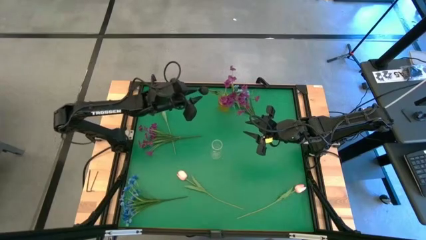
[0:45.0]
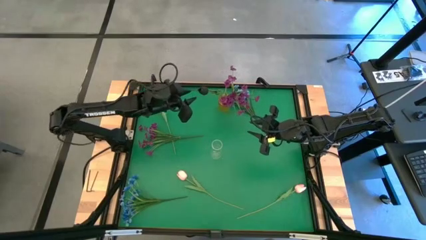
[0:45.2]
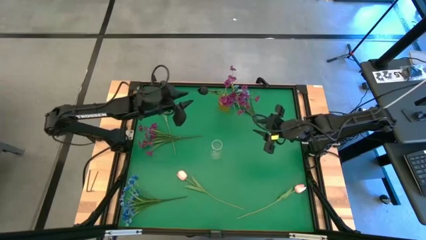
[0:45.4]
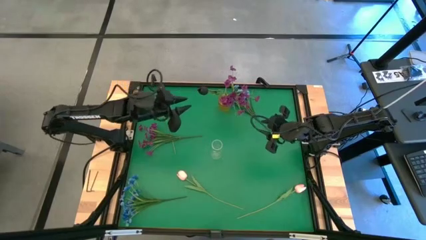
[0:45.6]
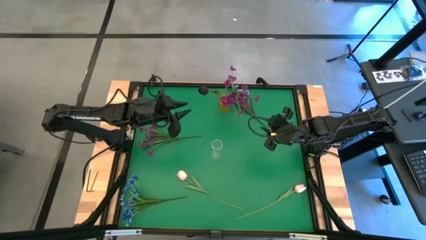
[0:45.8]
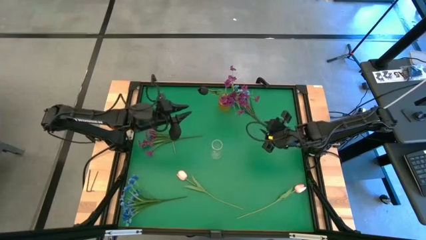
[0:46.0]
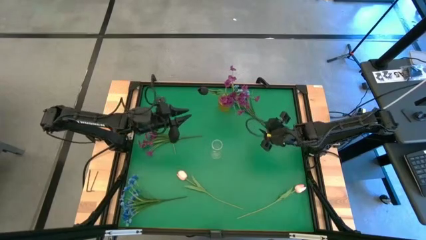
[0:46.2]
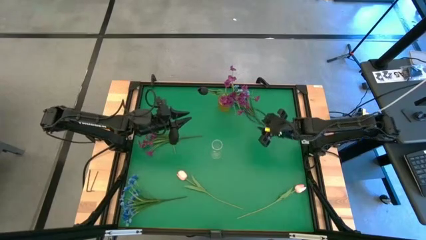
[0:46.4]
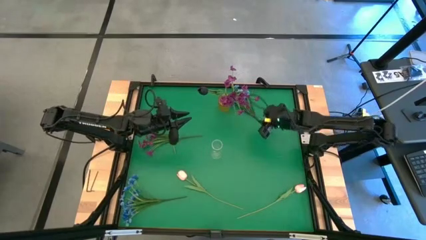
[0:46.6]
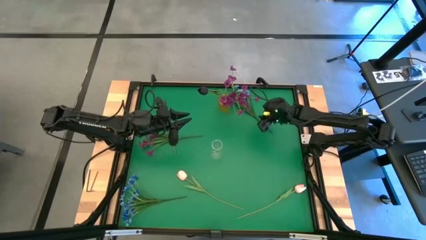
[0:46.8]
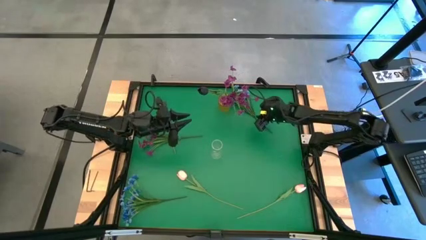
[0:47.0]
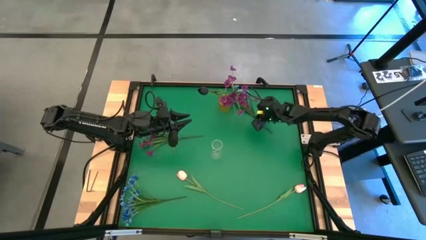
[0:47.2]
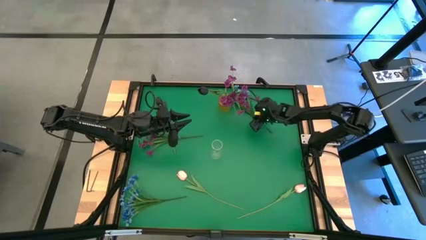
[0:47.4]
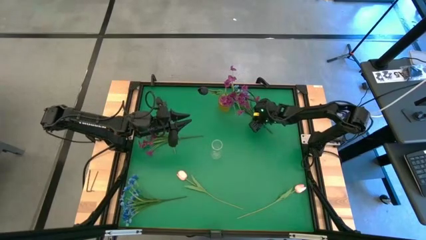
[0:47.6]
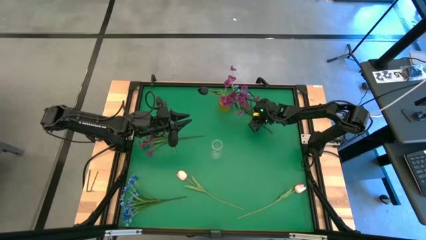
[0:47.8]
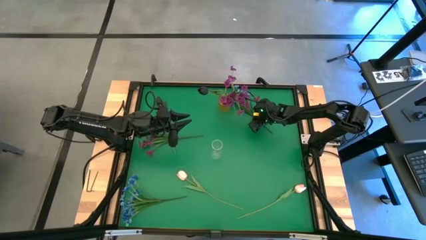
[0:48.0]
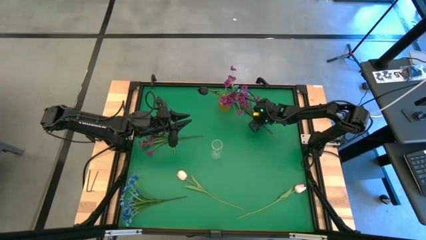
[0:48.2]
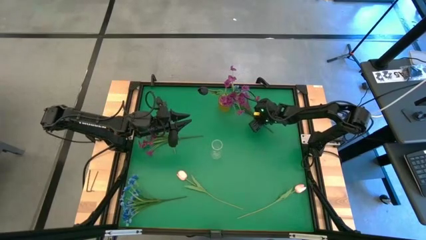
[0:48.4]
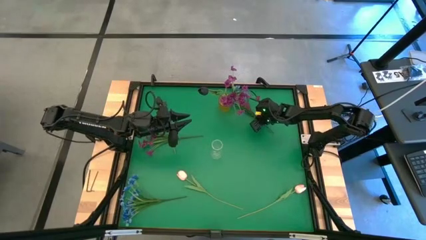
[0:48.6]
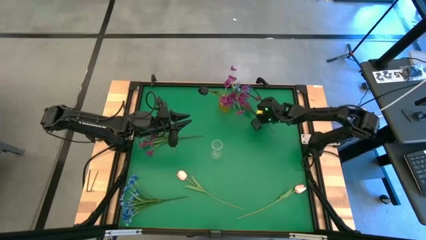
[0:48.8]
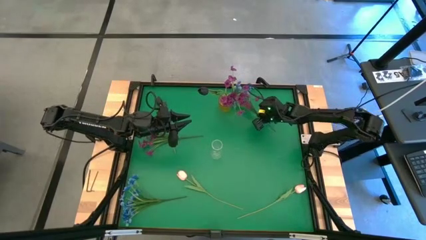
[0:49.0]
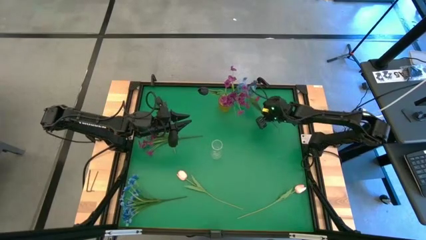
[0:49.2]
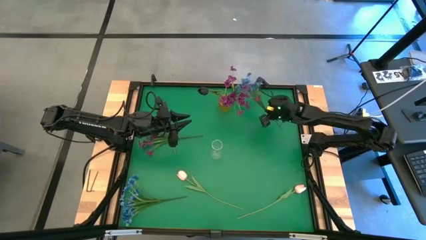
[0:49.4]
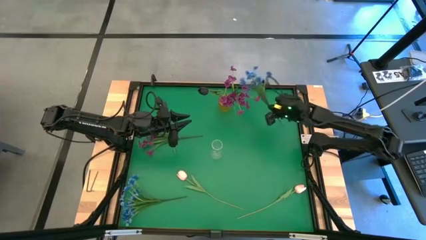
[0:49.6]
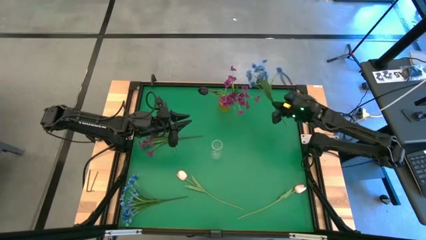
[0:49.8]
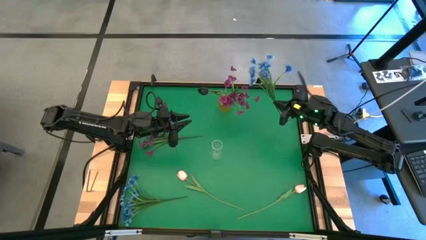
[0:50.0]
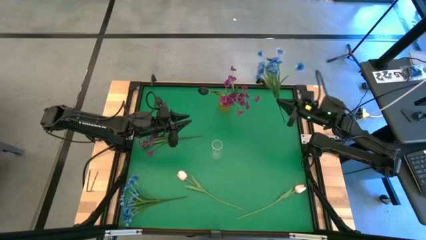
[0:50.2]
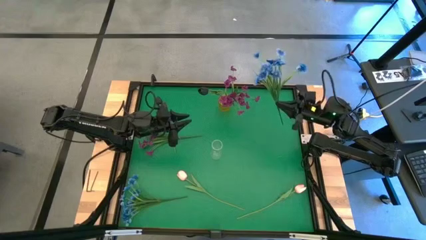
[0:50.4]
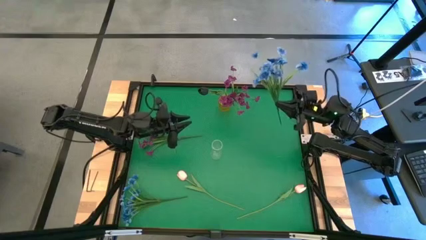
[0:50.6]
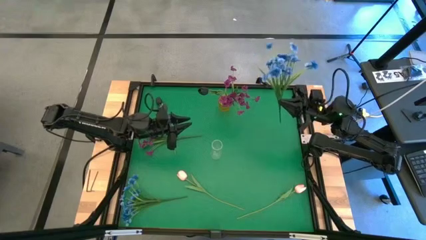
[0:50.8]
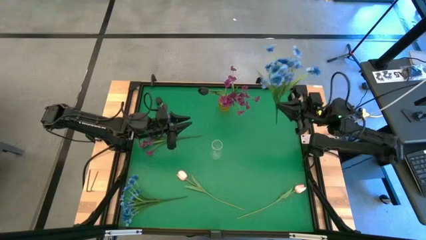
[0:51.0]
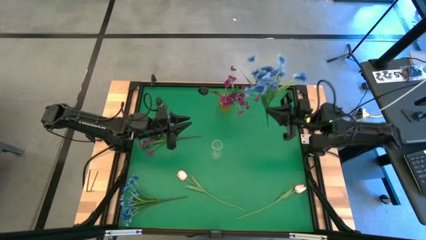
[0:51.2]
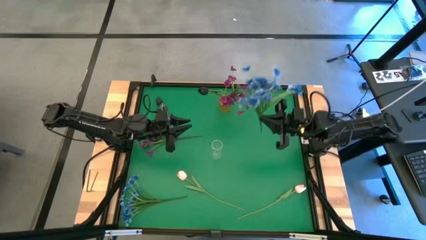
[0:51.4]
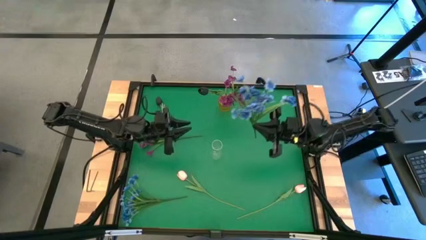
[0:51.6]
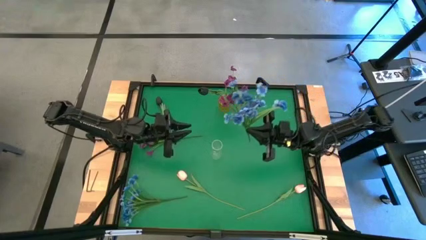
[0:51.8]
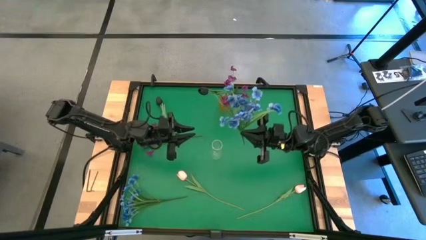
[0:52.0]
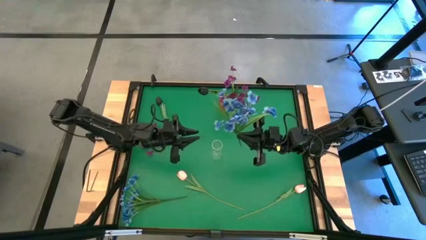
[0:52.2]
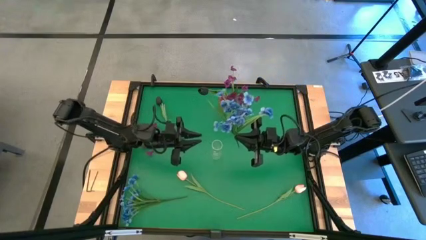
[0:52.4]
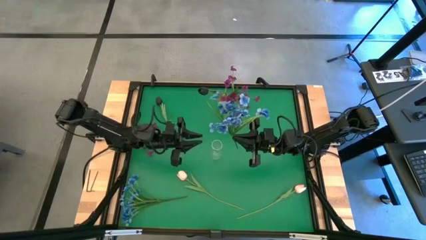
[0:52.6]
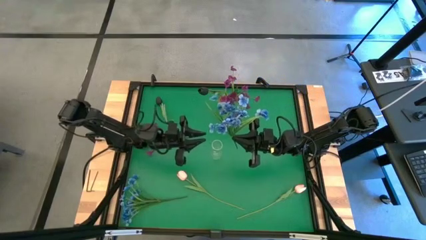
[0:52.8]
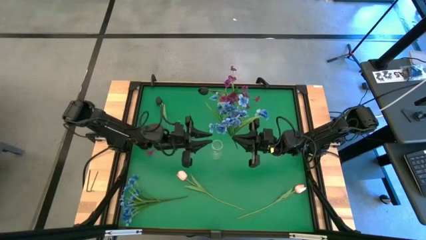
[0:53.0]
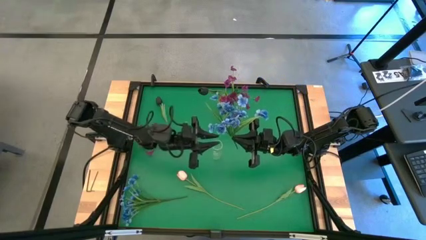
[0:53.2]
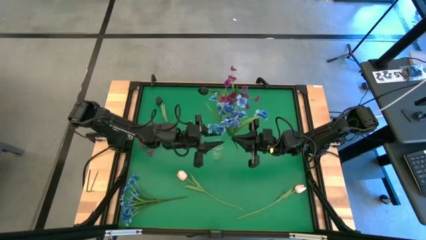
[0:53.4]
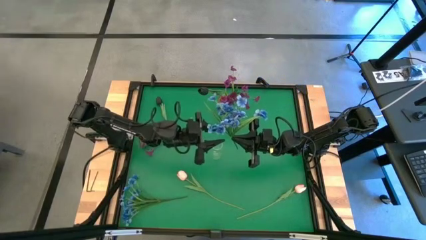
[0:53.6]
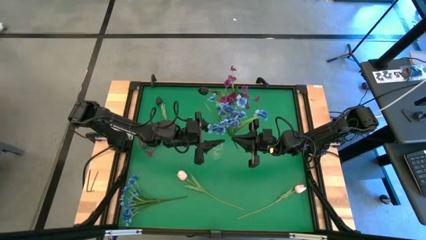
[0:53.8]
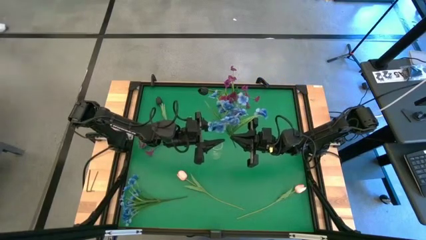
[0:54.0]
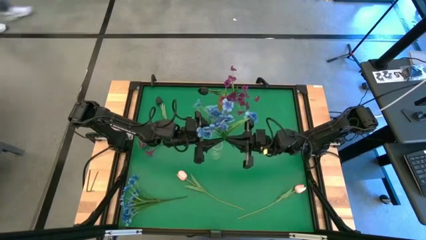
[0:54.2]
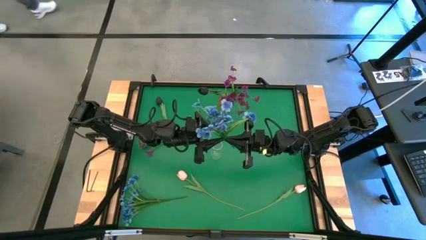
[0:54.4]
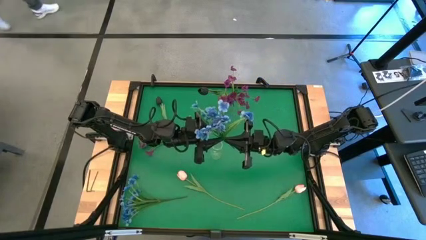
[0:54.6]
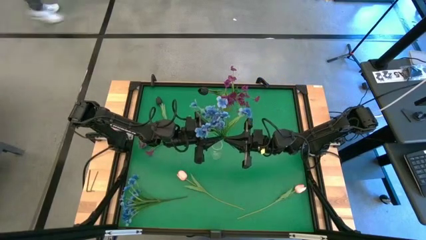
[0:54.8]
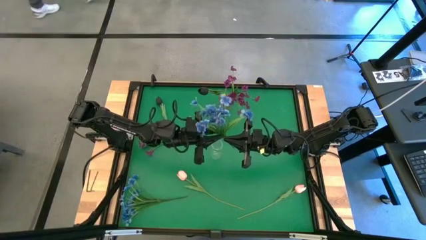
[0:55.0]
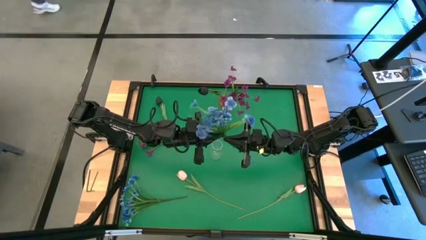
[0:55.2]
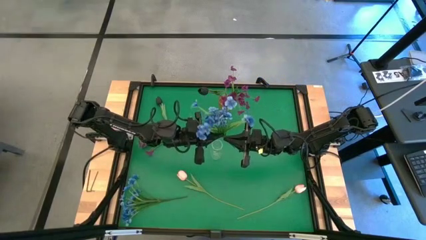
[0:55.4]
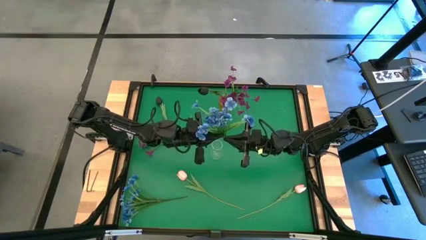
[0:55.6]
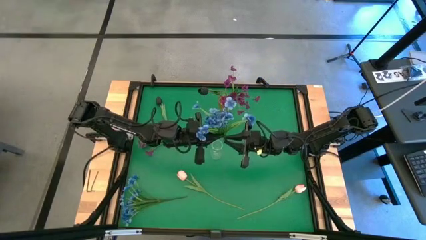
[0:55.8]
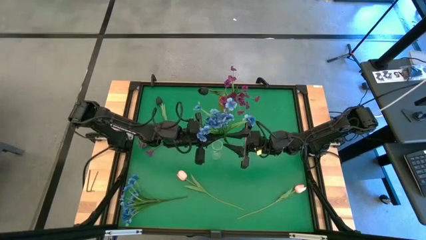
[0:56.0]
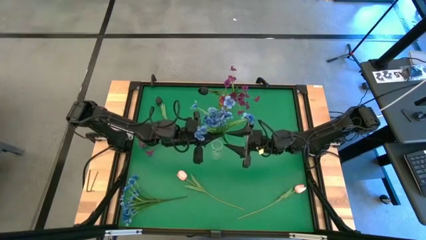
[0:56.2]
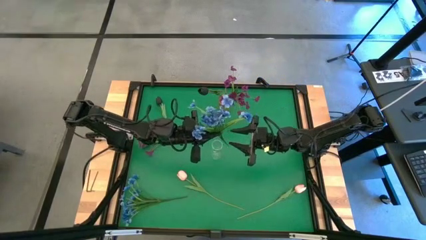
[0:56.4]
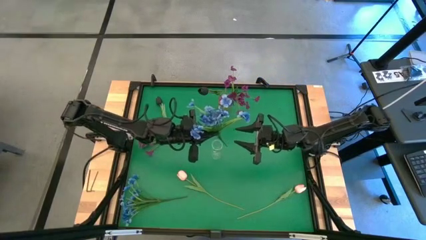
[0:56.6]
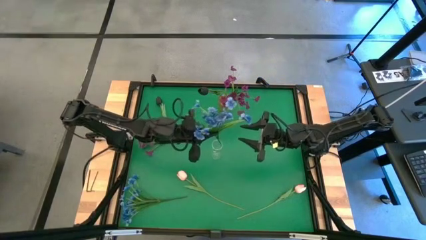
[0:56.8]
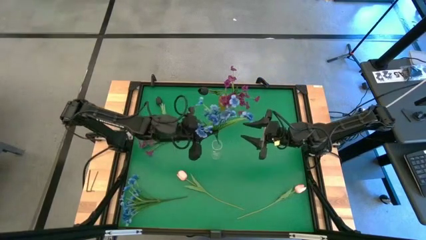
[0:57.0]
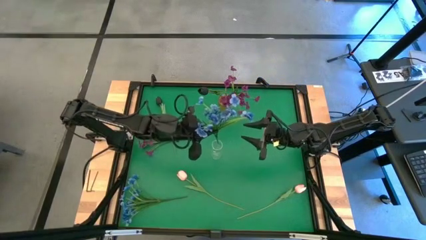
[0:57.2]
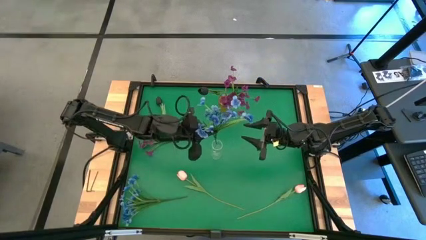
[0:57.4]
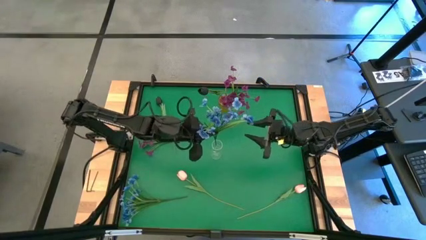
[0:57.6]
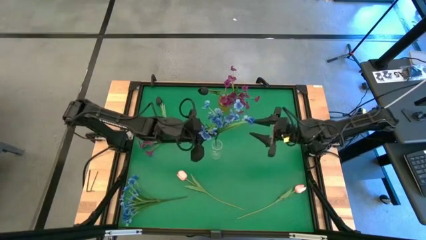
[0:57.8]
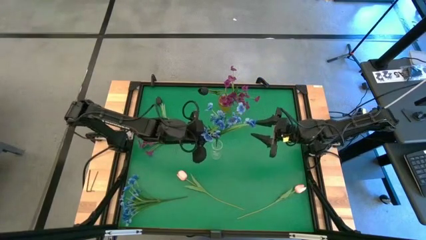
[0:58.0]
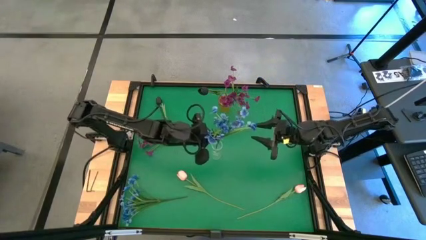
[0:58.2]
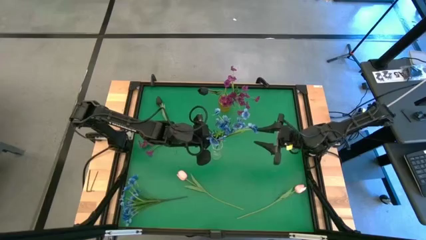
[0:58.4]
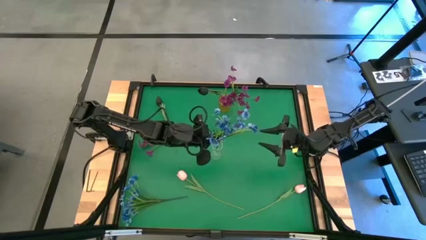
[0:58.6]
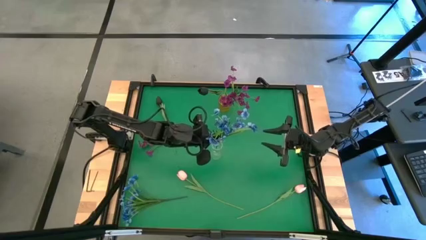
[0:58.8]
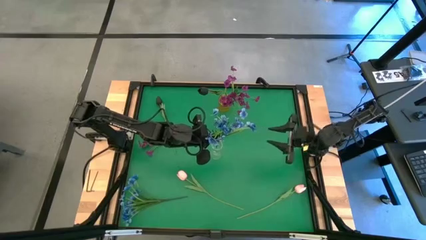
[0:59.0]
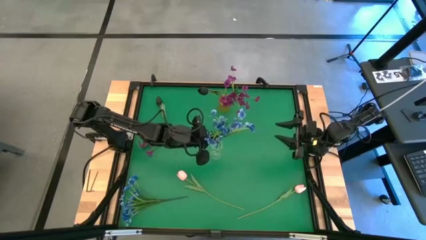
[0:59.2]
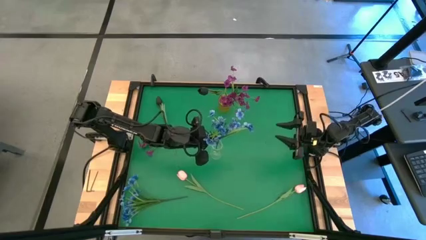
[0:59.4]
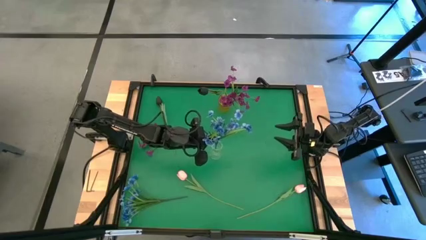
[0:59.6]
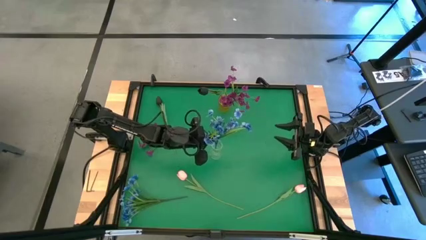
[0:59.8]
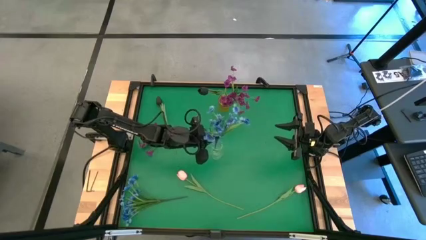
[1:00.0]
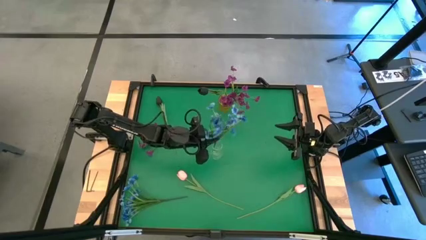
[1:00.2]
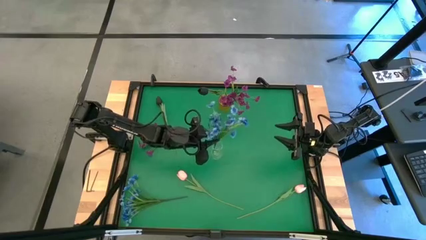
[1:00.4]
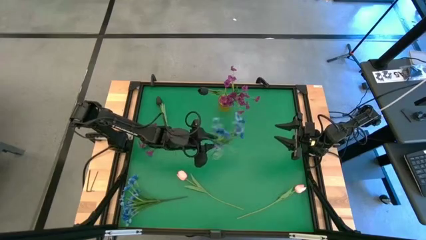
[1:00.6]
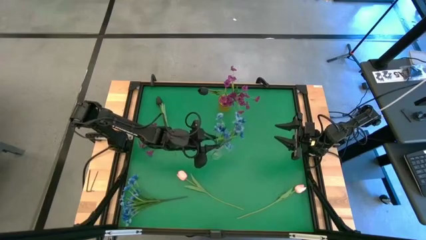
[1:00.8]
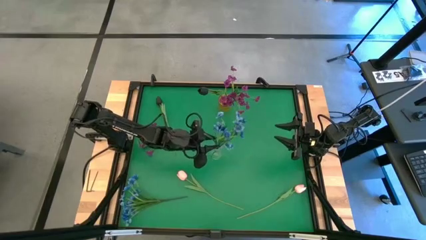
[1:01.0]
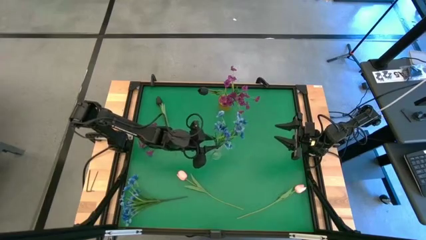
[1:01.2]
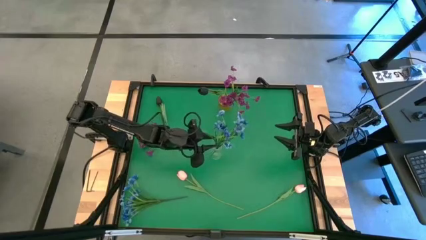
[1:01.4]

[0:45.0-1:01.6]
Task: Sort flowers into vase by color
Put the top blue flowers into the transparent vase
